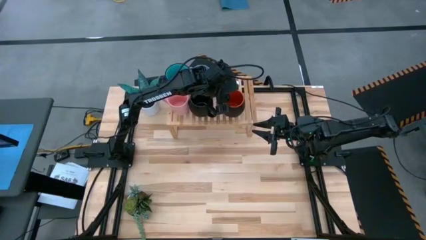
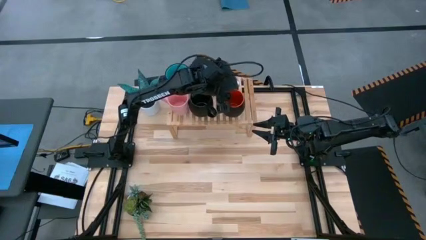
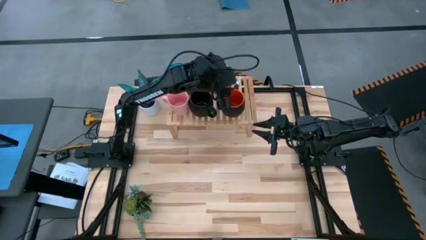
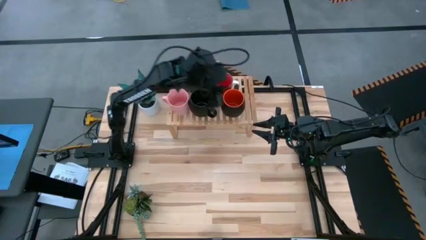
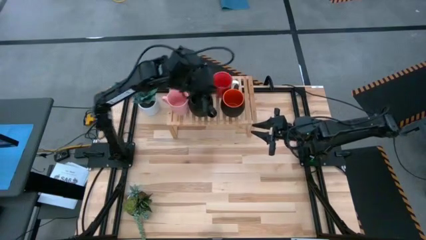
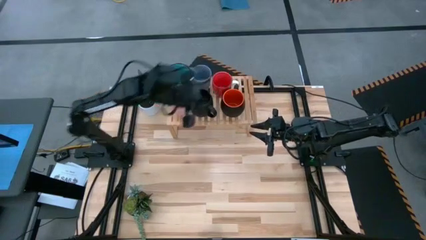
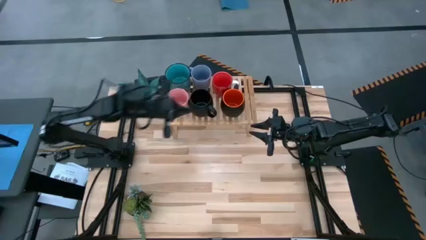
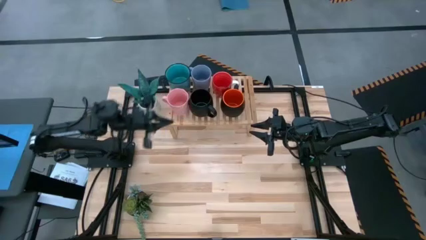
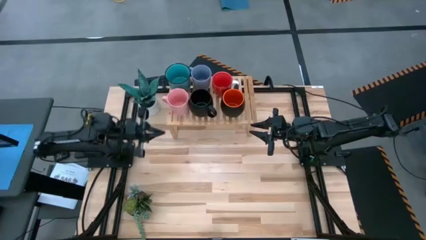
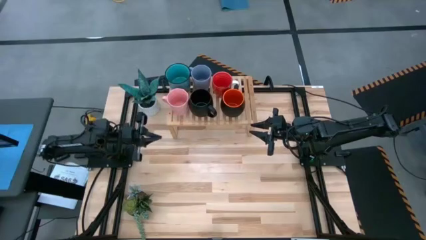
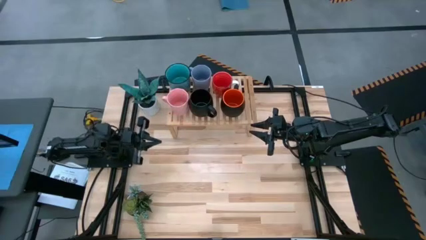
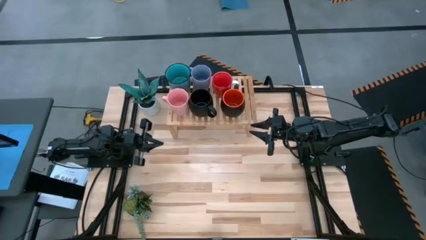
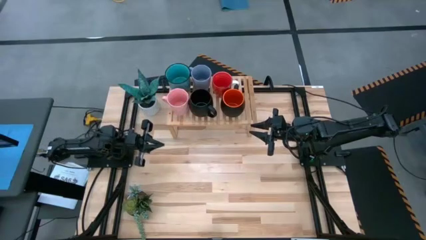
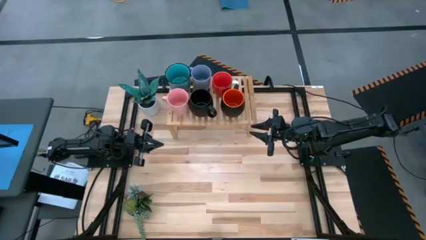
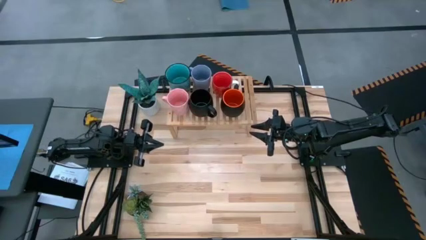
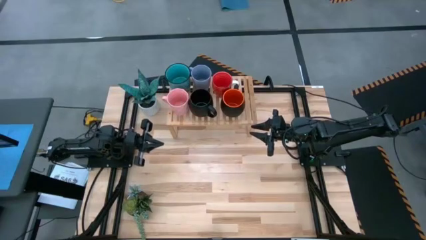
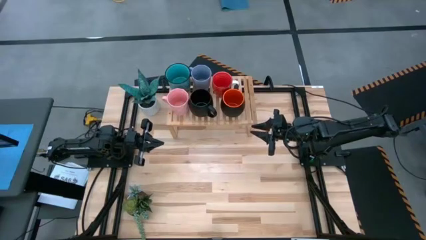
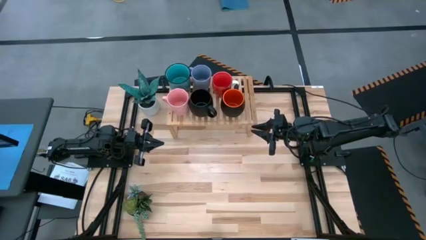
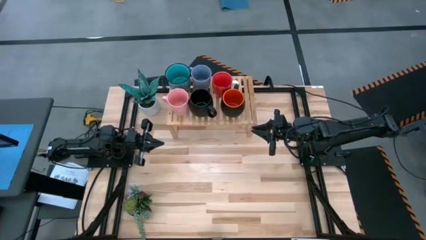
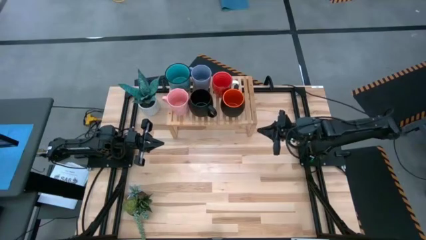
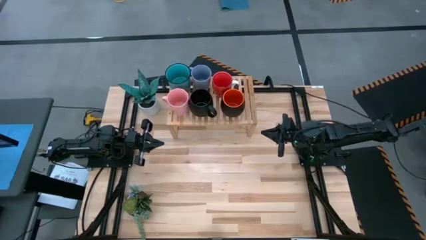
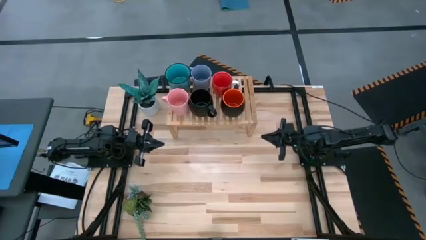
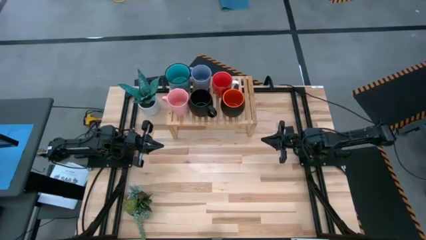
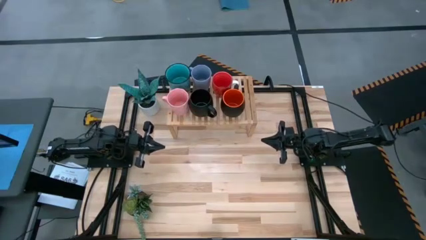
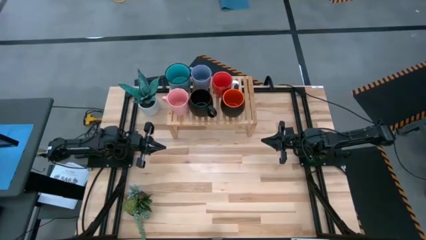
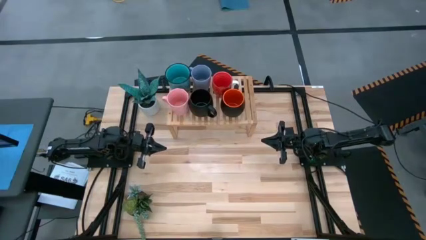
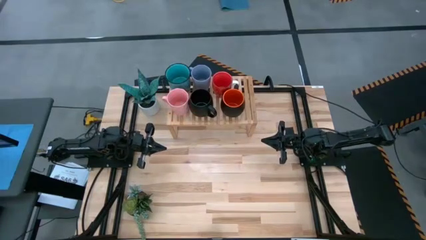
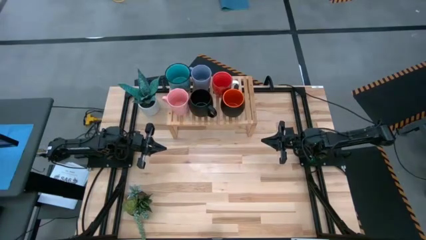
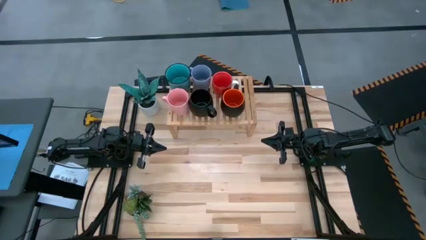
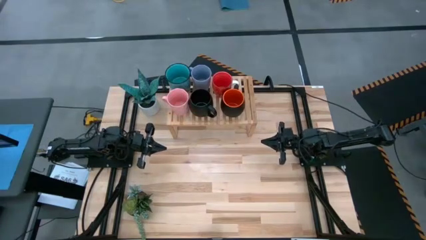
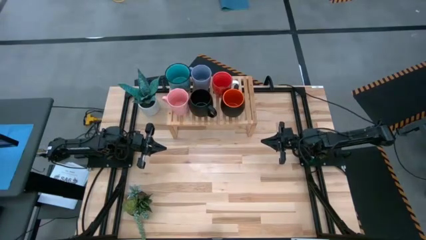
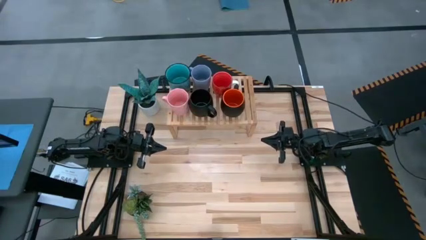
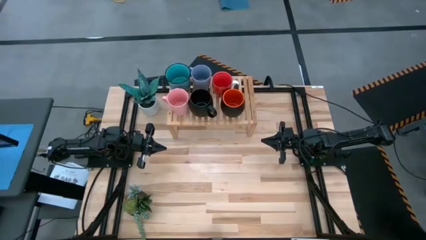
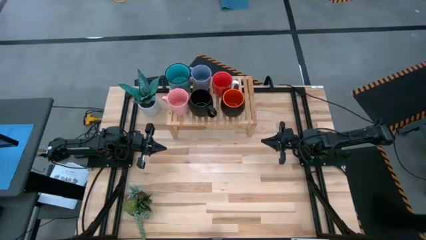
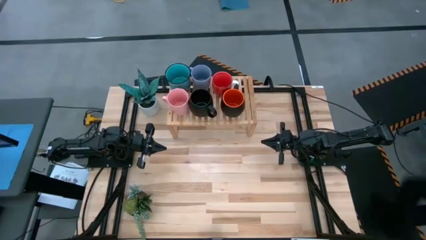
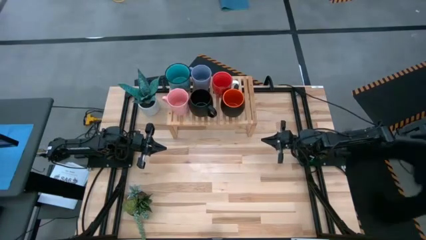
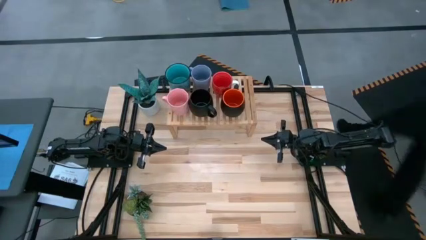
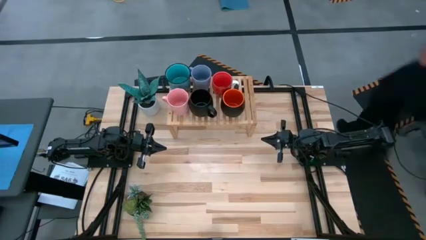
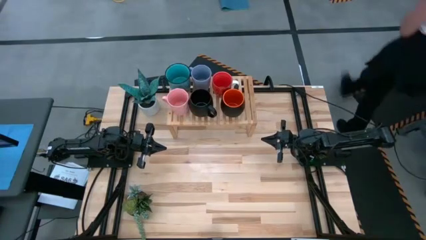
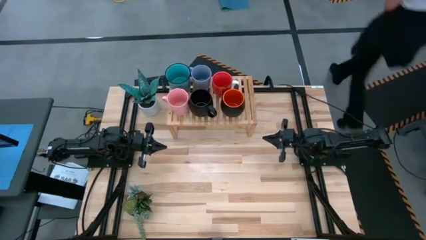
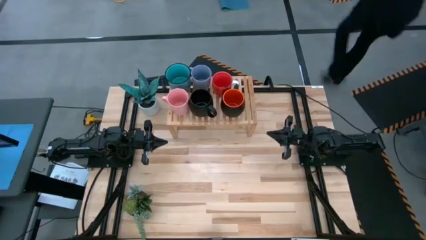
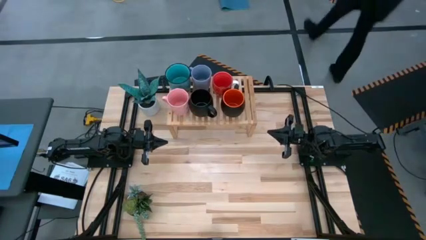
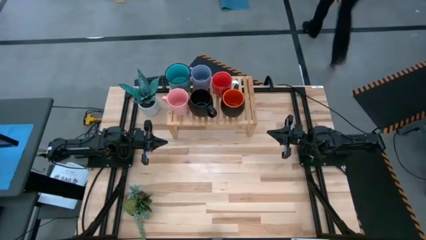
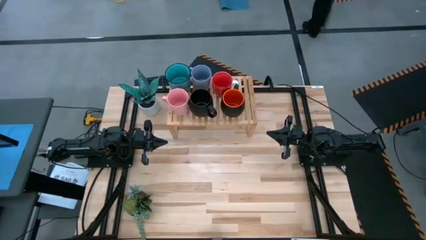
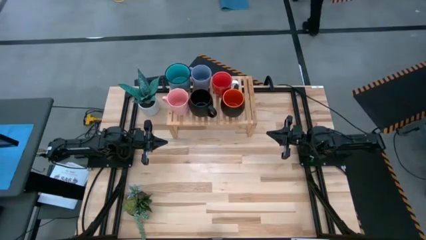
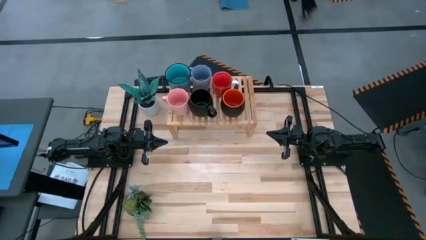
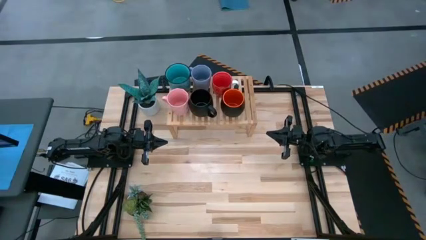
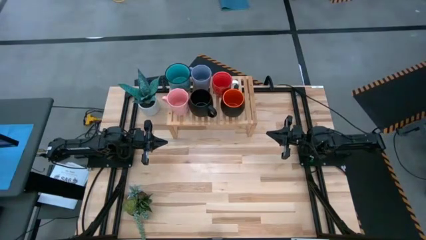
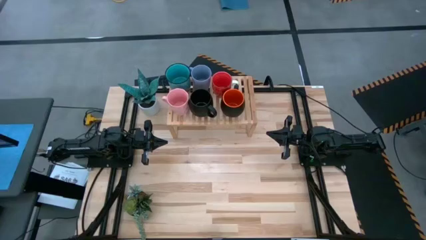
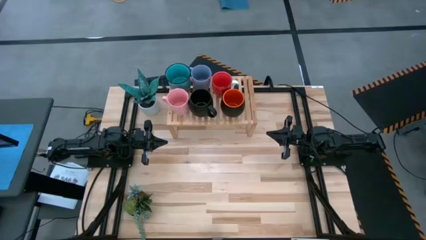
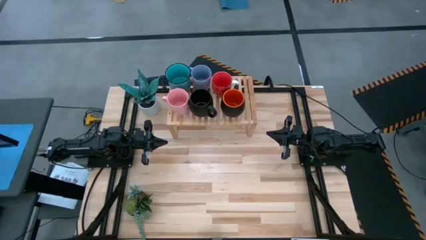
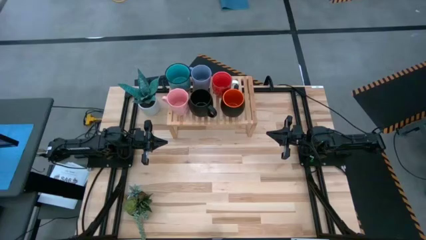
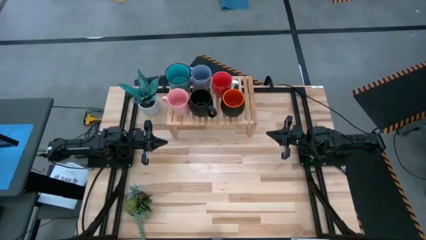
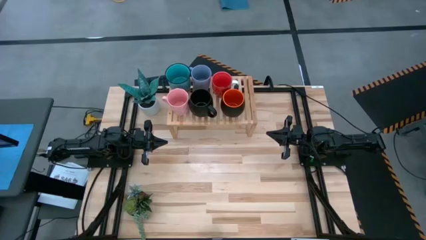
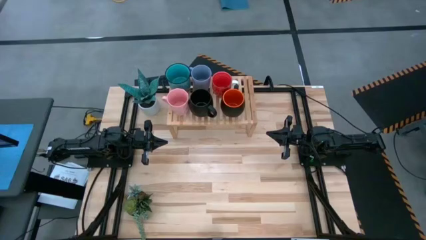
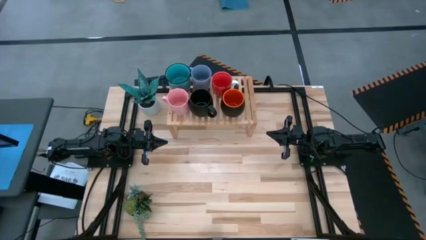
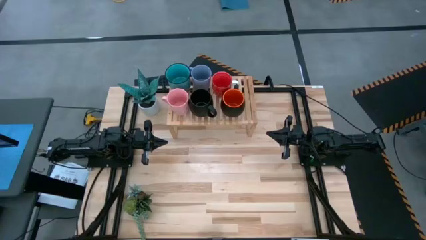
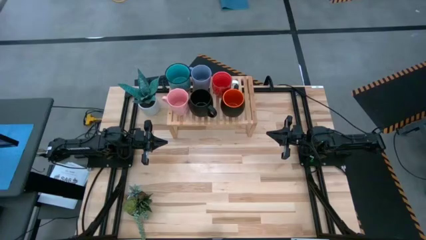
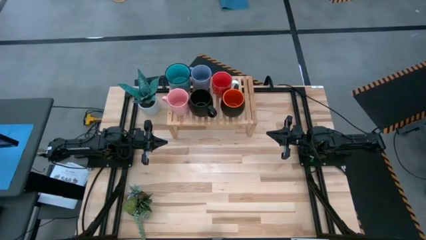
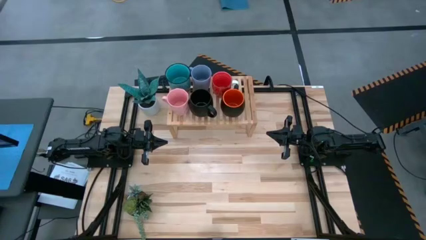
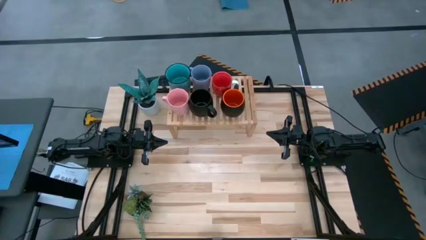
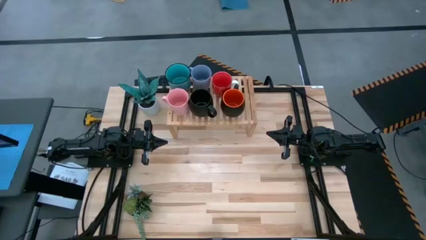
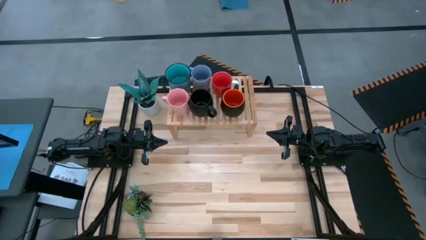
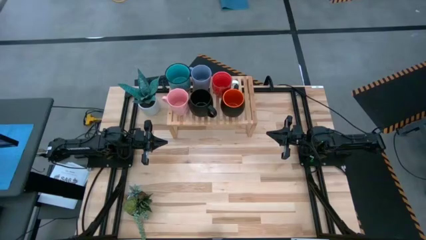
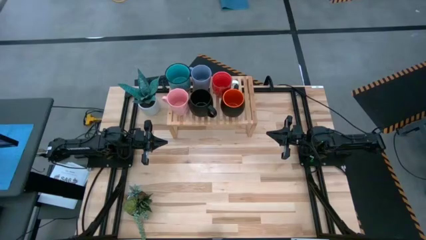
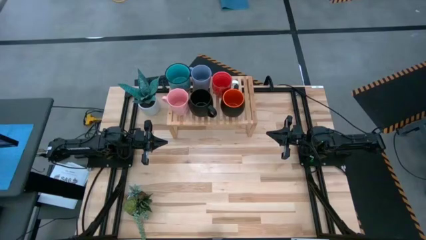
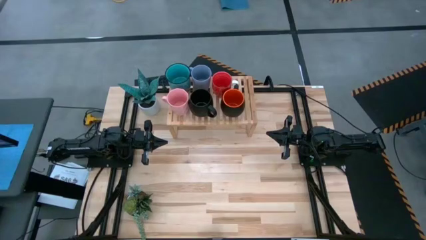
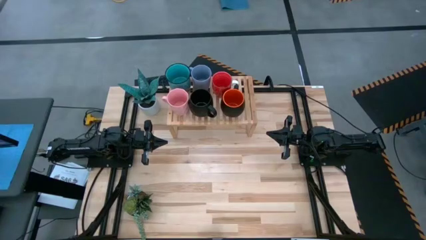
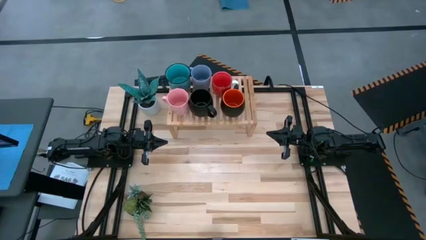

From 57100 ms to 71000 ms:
Task: Place coffee mugs
Return to Home Position

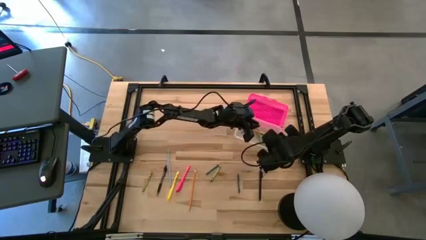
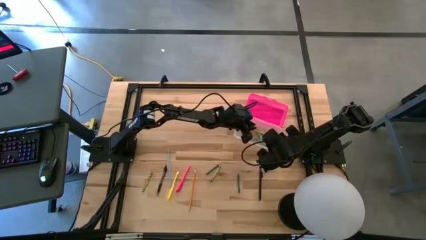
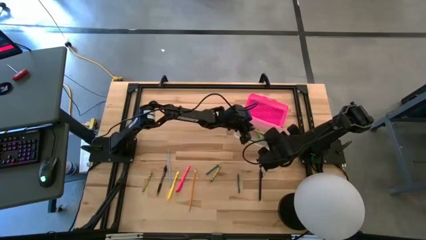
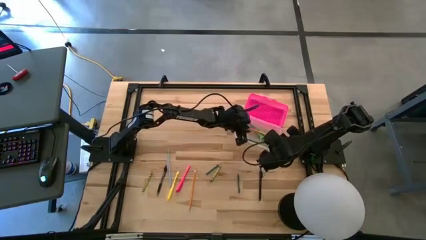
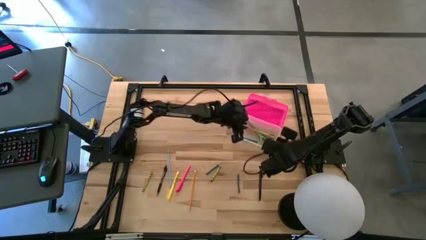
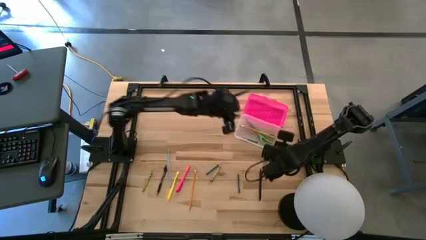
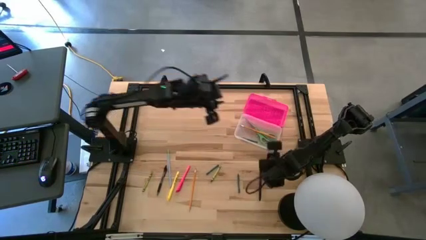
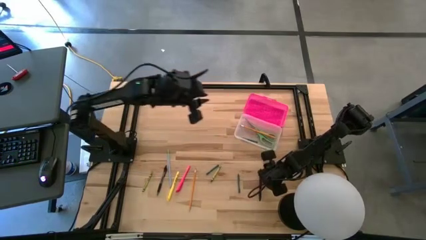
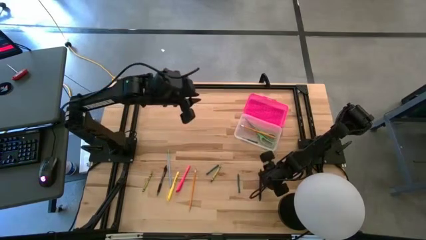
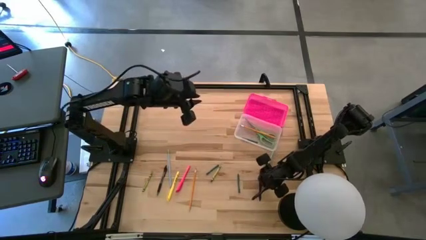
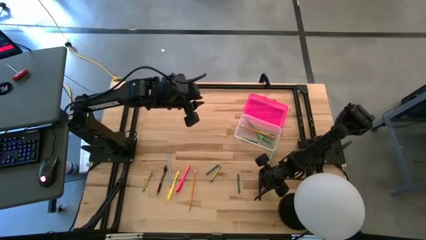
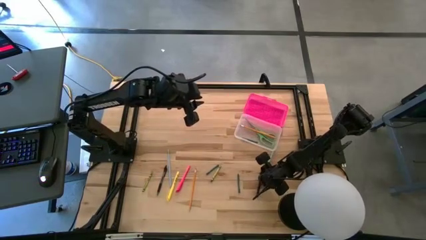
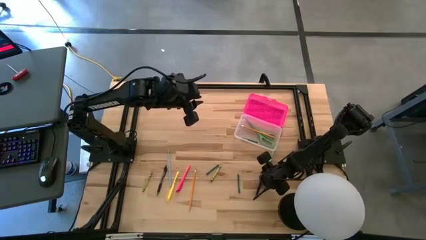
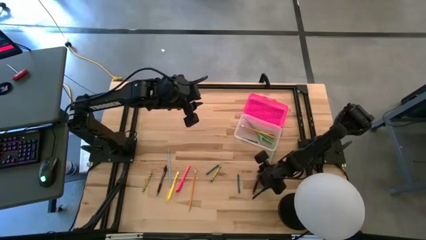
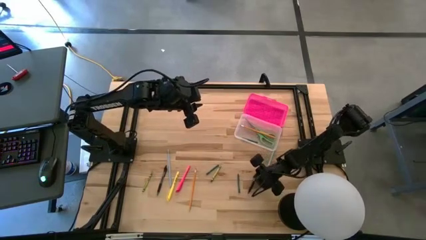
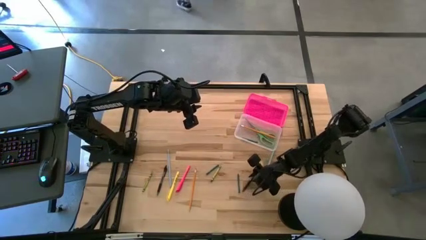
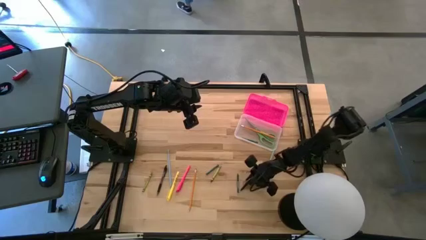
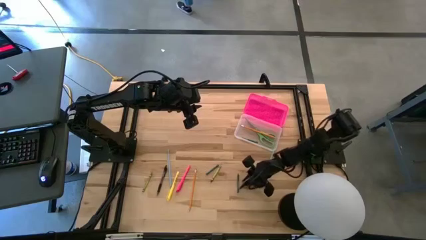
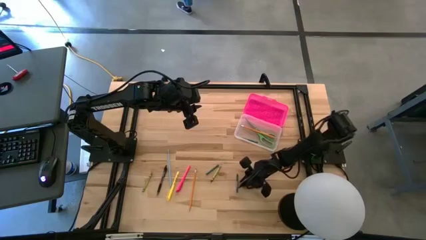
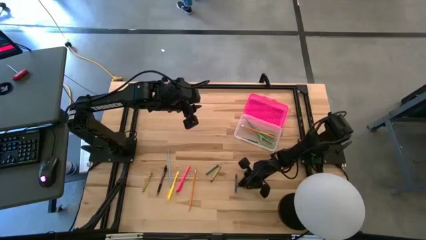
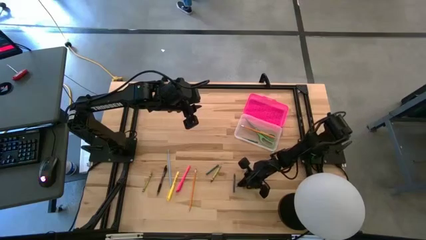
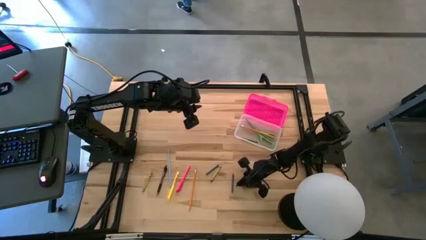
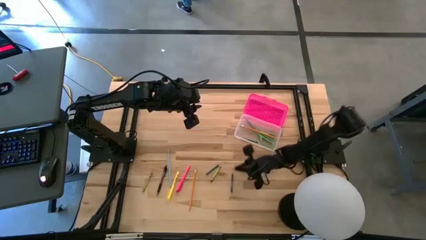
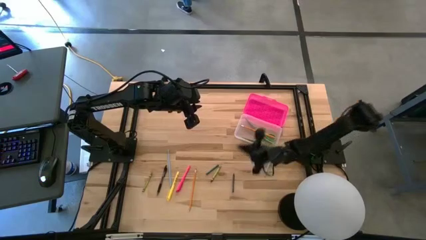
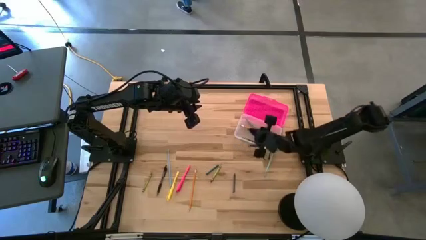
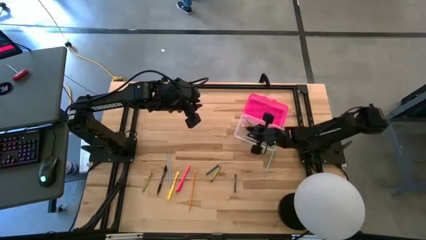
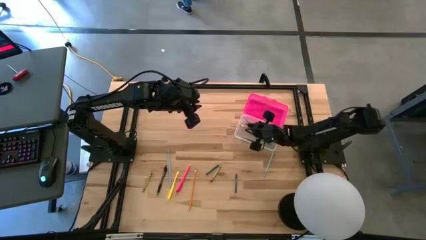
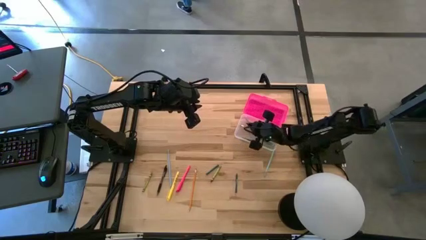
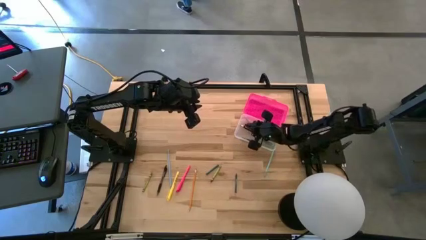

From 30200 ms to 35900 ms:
Task: Pick & place school supplies into a supply box
Put the right black pen into the pink supply box
